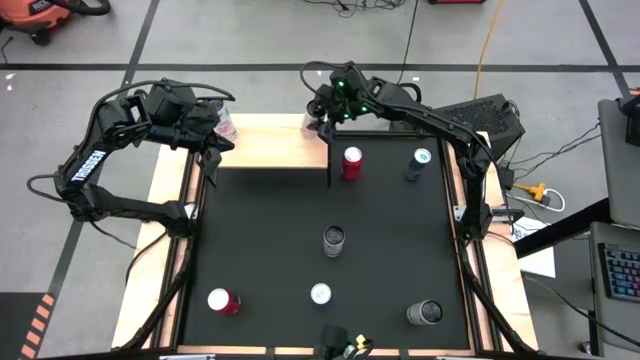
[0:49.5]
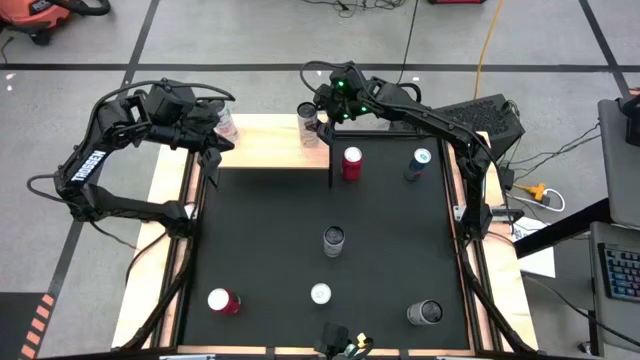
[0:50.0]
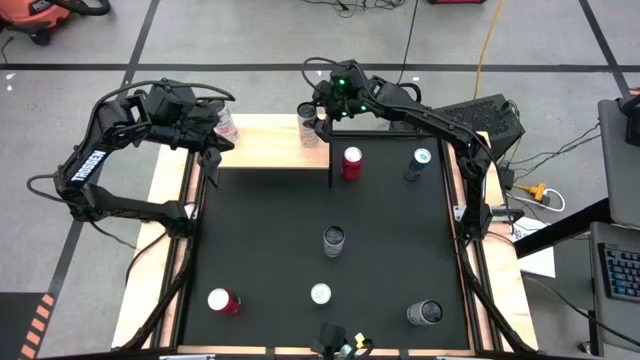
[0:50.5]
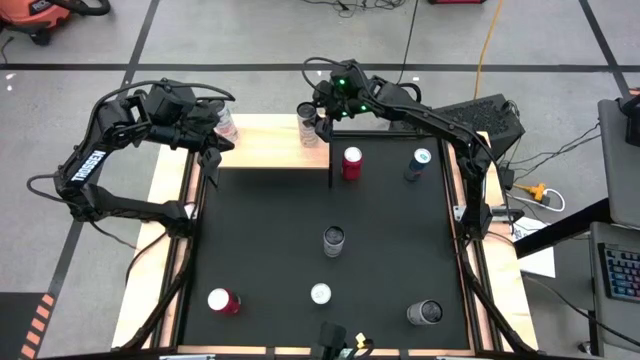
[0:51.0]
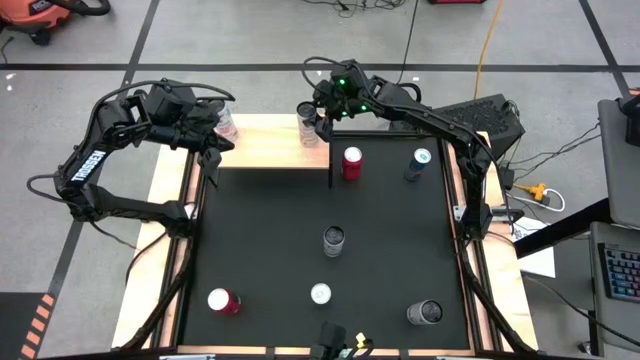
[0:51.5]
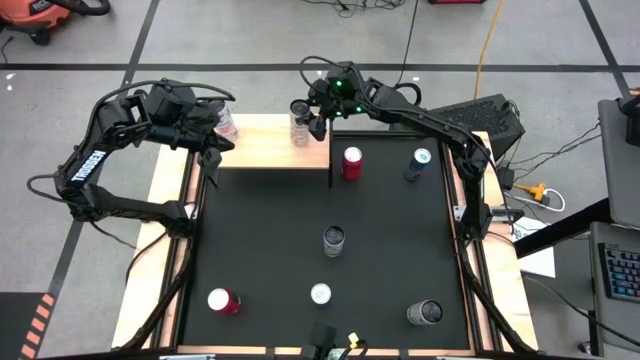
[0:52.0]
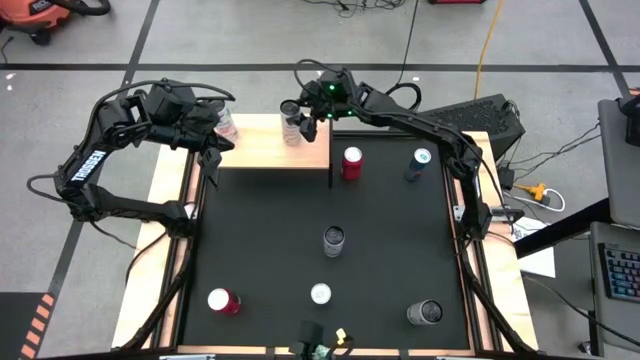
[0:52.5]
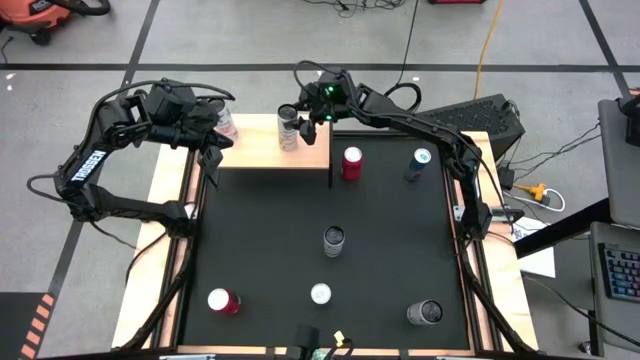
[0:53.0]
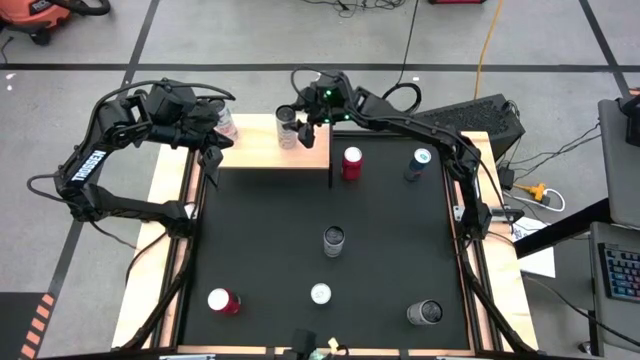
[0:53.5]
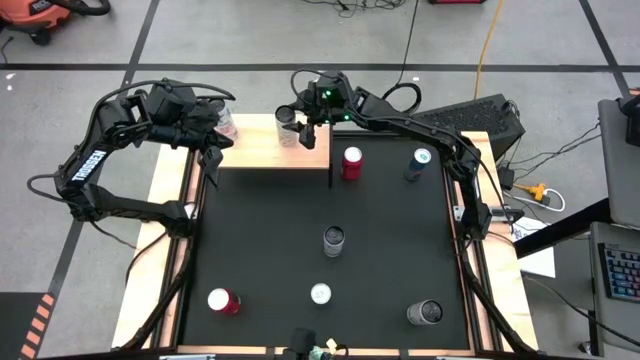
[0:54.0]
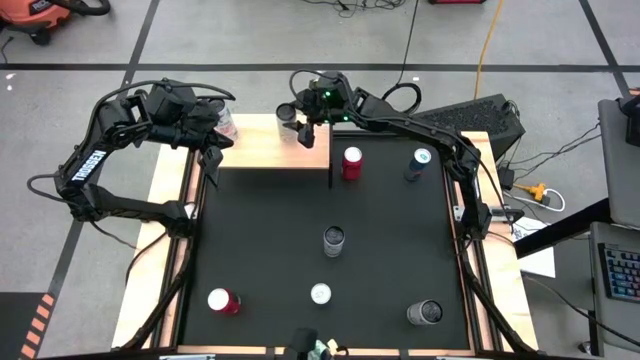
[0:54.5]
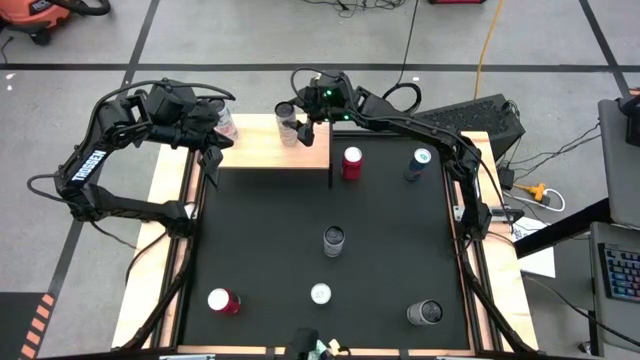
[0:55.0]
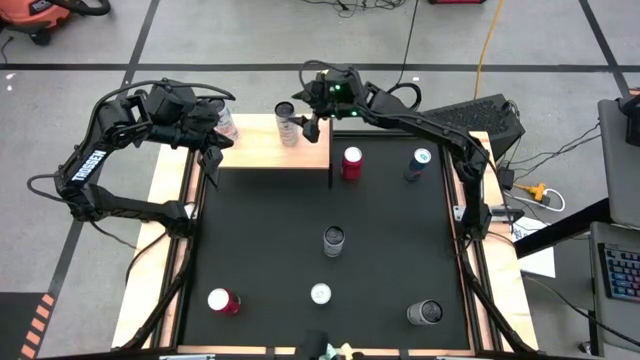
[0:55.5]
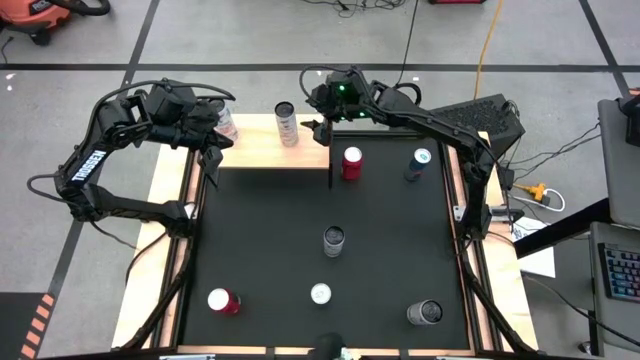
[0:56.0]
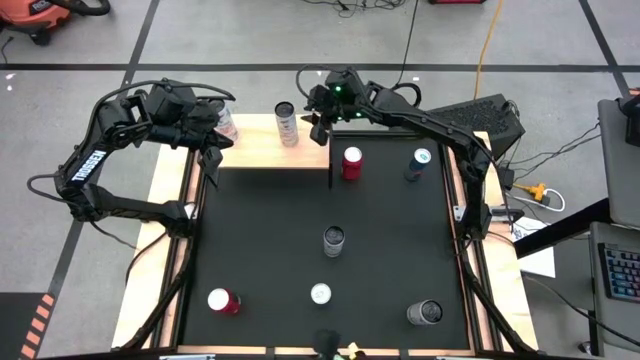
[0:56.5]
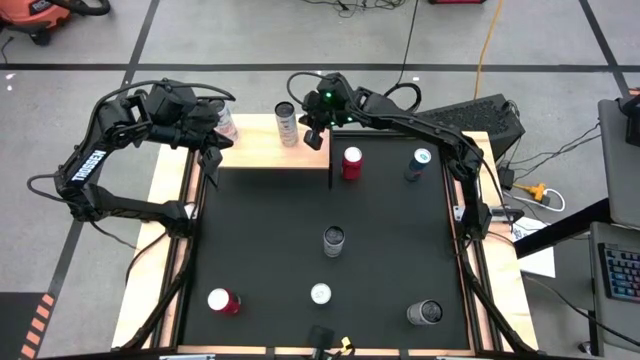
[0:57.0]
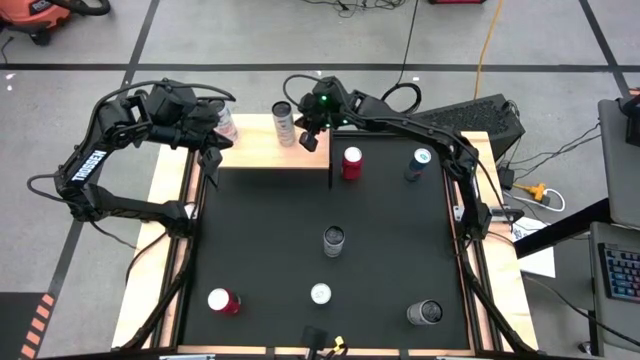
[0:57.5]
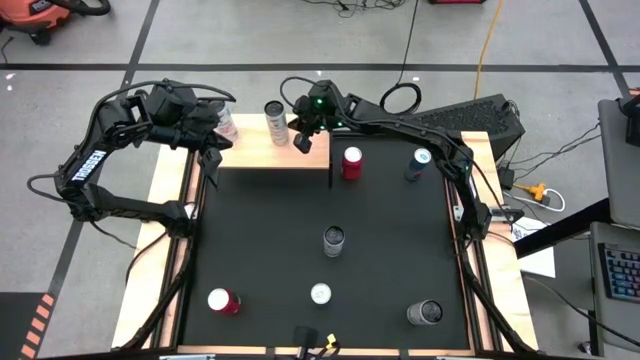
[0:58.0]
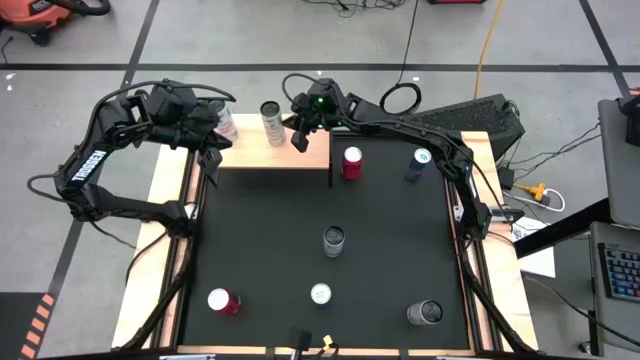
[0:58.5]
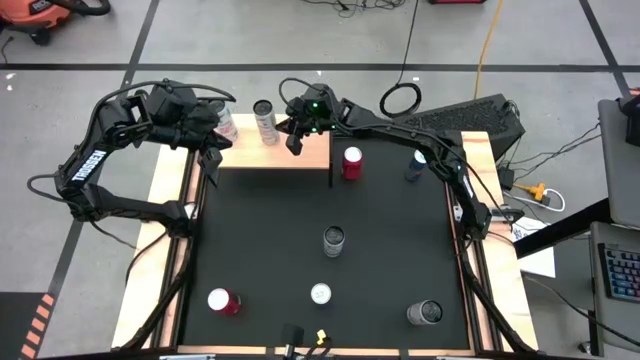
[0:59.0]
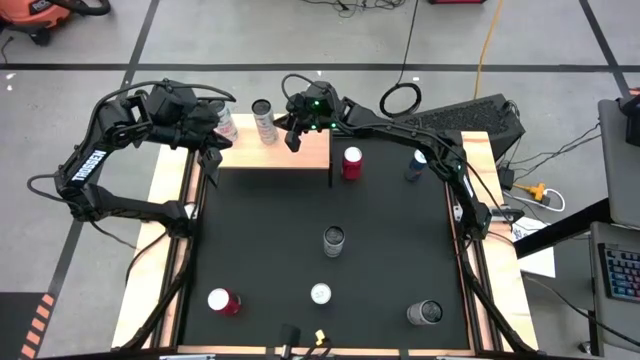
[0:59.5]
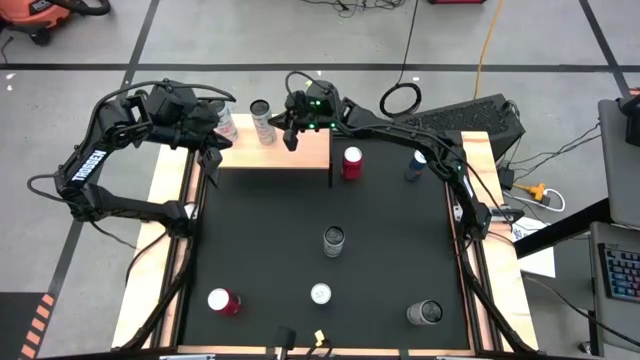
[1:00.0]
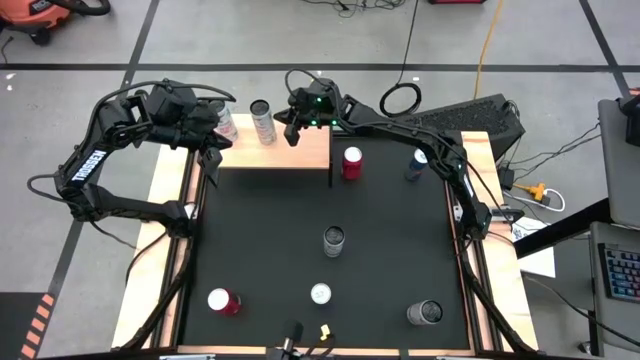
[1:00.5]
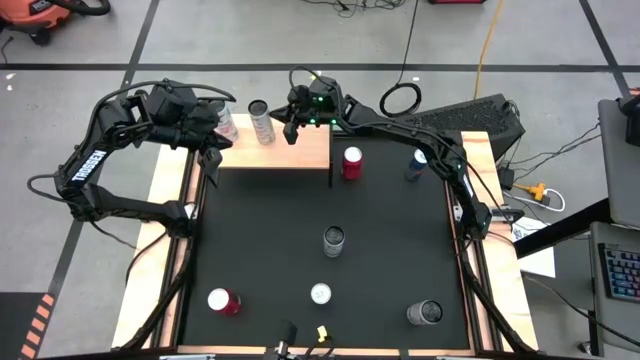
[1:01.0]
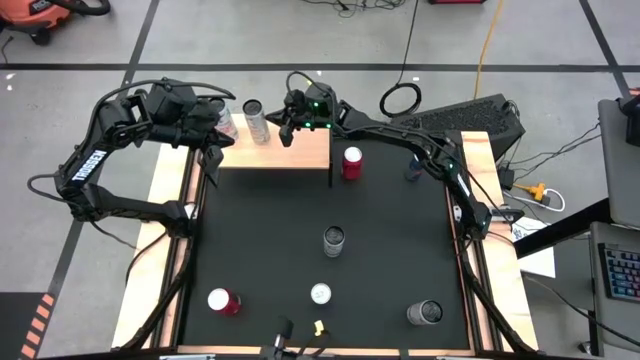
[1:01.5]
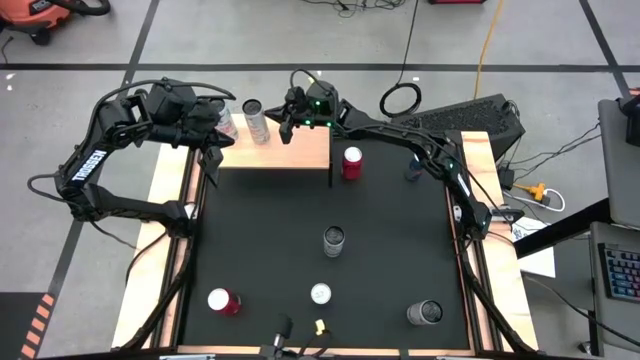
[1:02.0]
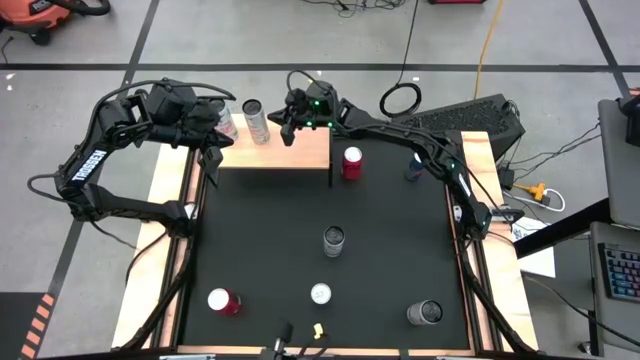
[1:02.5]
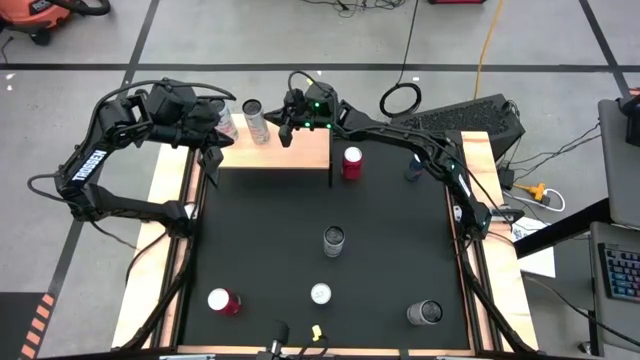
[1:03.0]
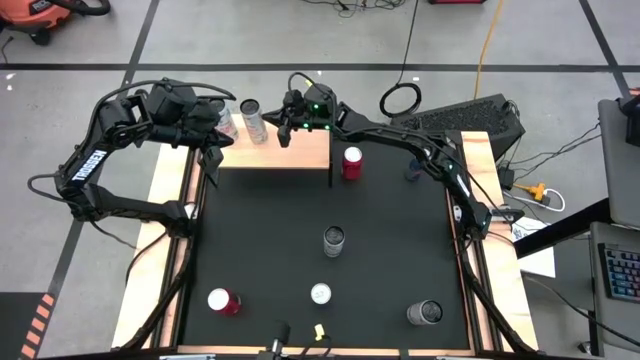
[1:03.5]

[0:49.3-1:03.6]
Task: Place canned beverage on shelf
Put the right white yellow soda can on the shelf

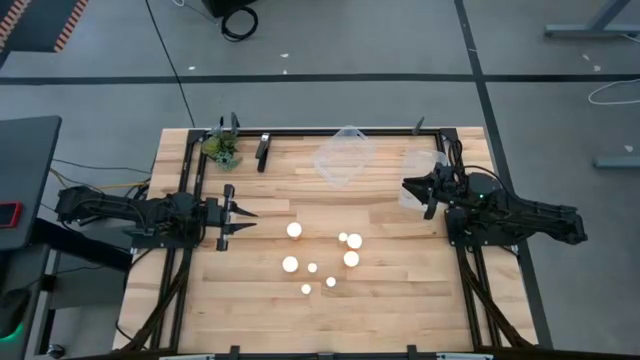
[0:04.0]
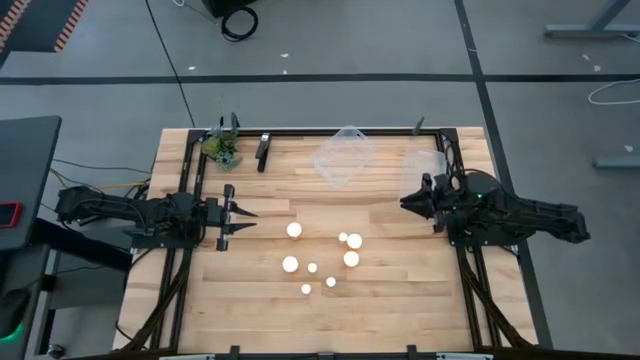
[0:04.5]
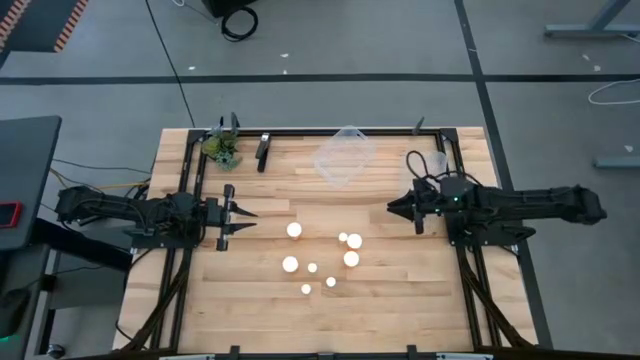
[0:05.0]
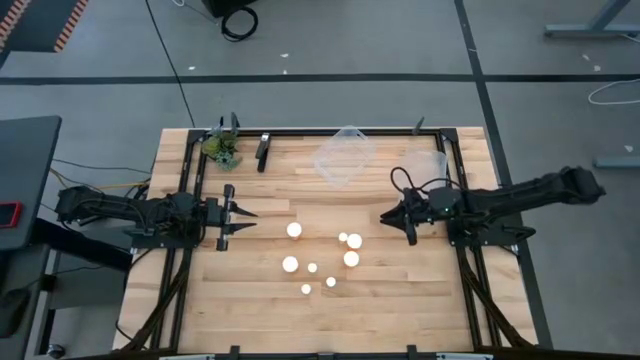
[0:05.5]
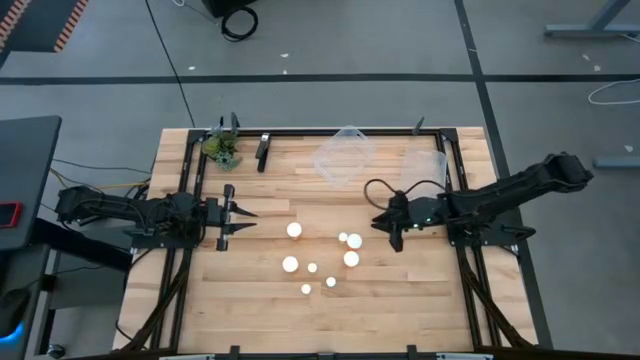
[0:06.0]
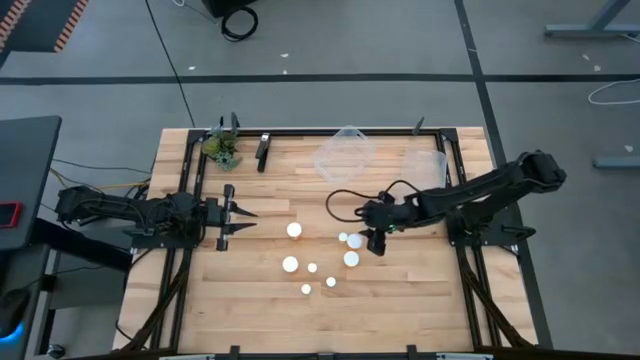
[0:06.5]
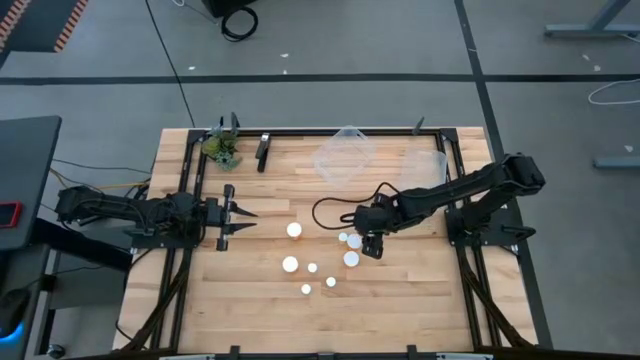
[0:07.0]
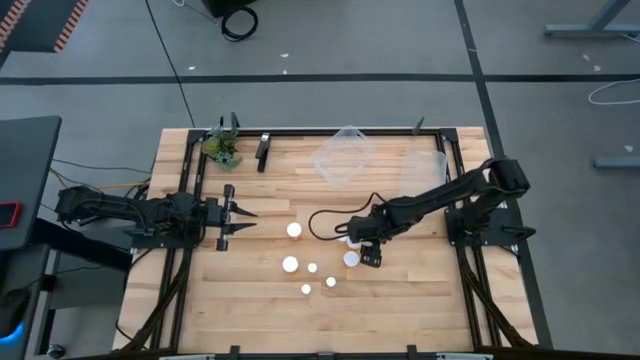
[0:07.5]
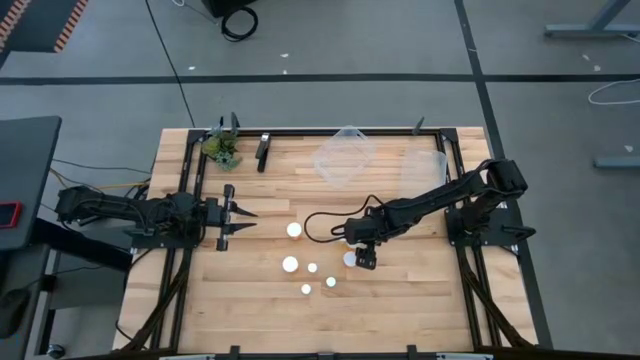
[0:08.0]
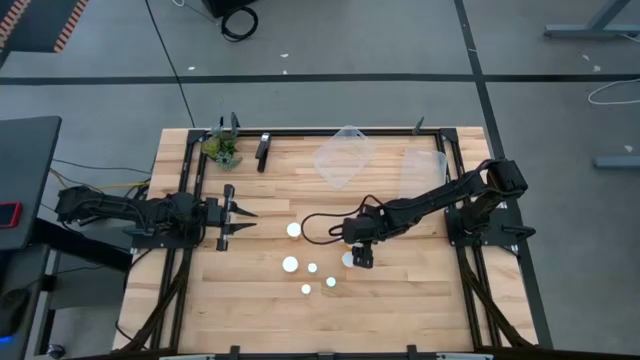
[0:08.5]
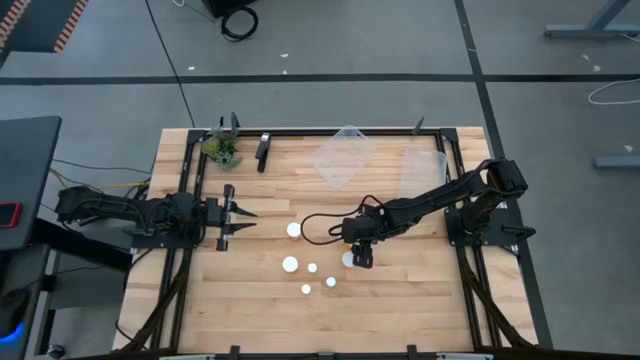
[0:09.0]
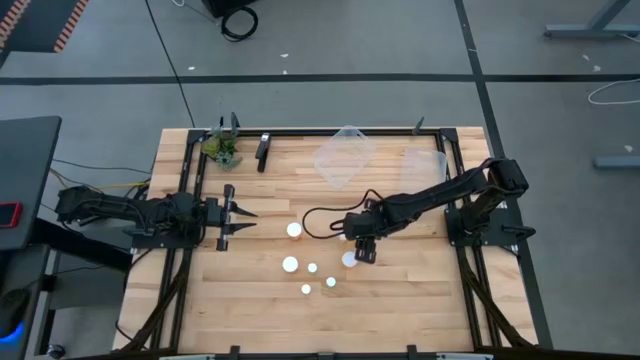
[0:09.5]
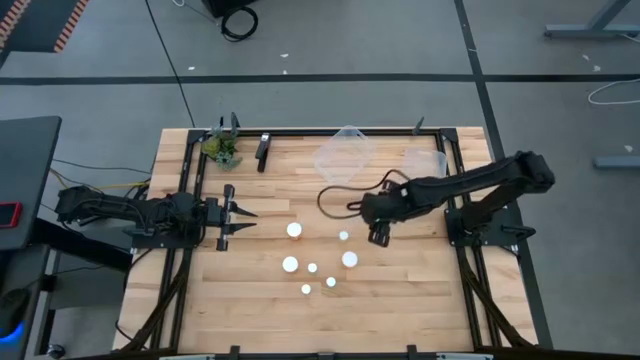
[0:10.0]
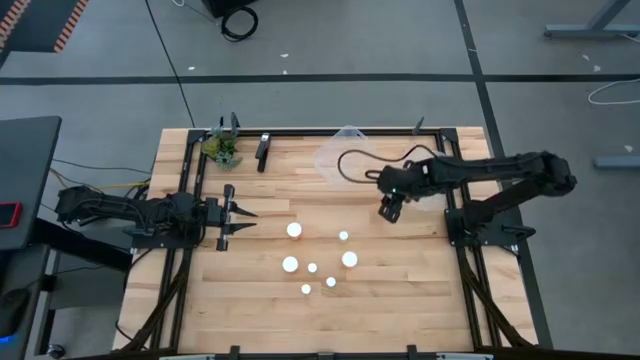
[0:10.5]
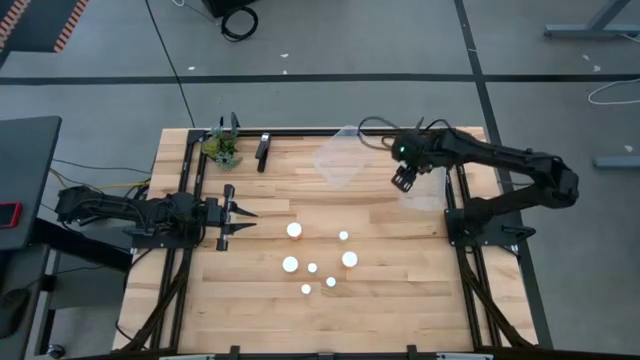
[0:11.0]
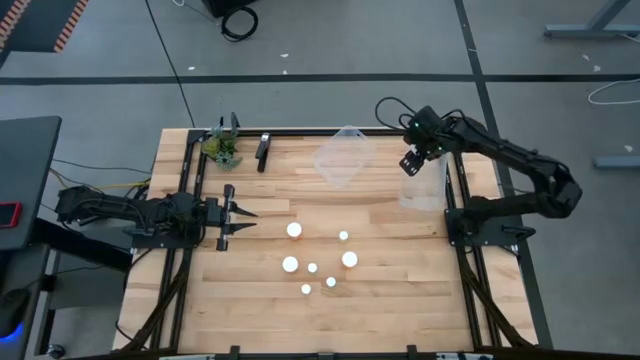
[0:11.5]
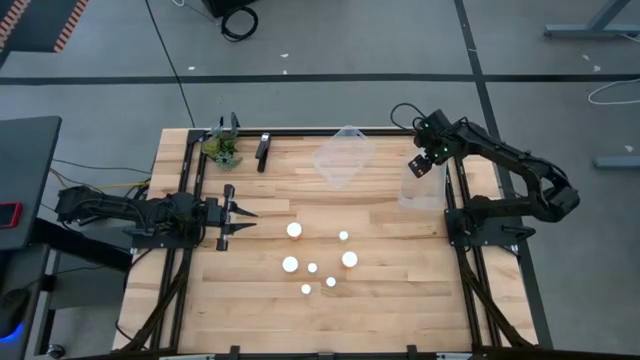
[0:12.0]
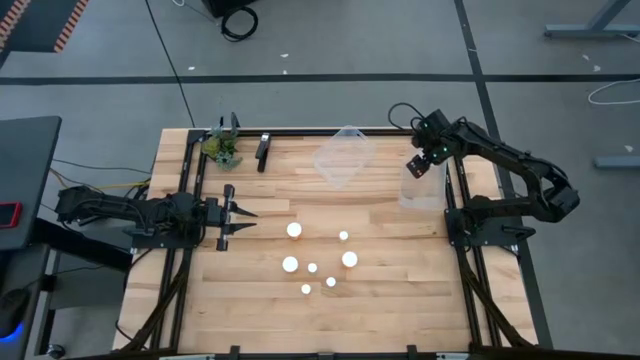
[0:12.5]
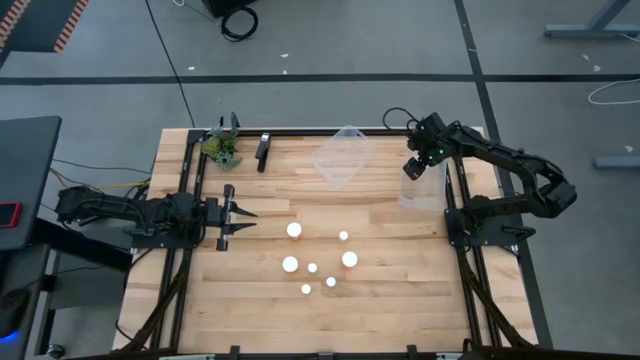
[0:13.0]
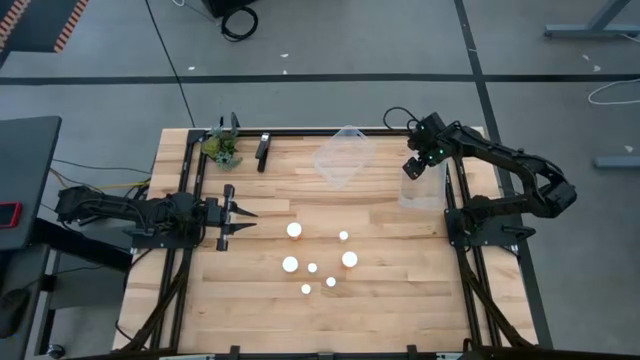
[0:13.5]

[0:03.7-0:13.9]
Task: Pick and place medicine bottles into bin by pill shape (circle, oval)
Put the big orange pill bottle into the right transparent bin
